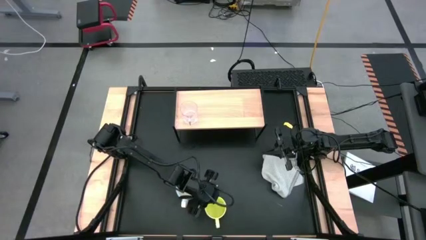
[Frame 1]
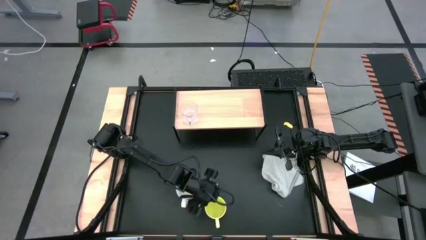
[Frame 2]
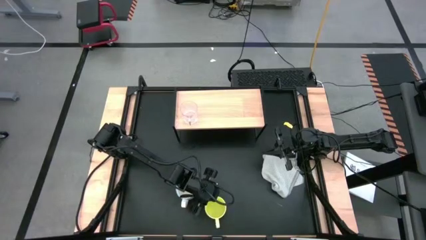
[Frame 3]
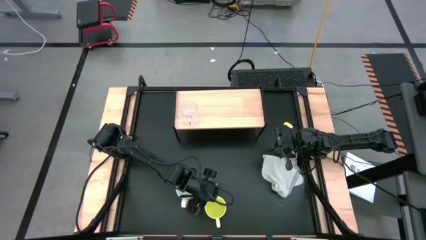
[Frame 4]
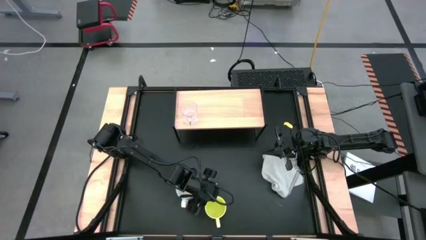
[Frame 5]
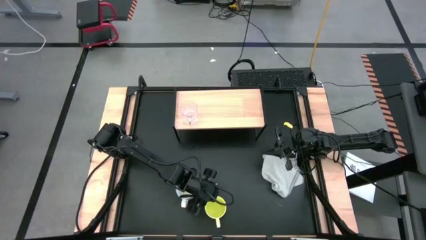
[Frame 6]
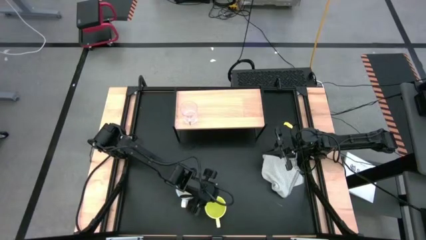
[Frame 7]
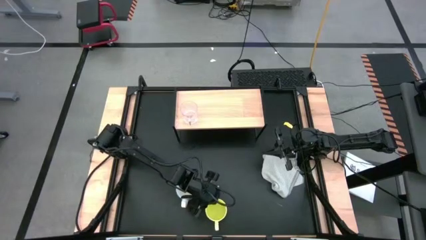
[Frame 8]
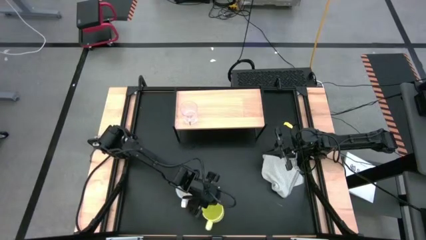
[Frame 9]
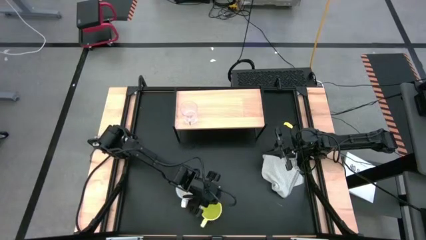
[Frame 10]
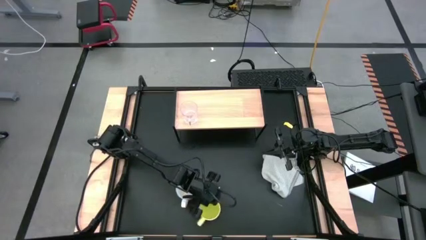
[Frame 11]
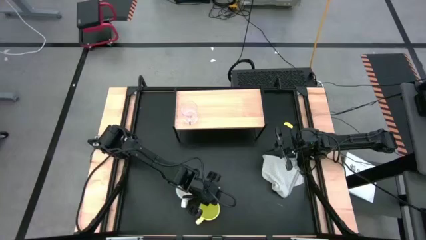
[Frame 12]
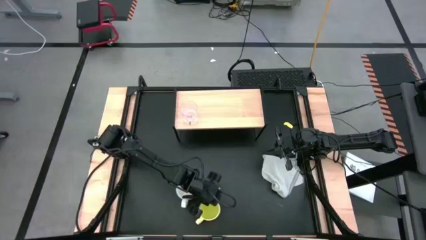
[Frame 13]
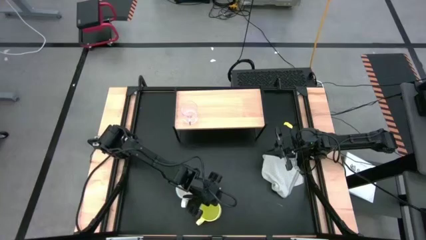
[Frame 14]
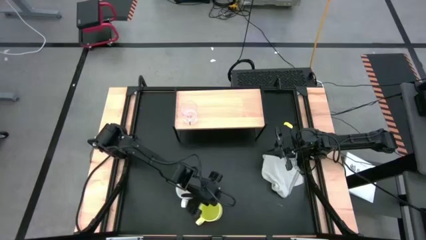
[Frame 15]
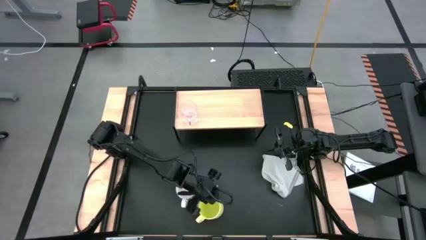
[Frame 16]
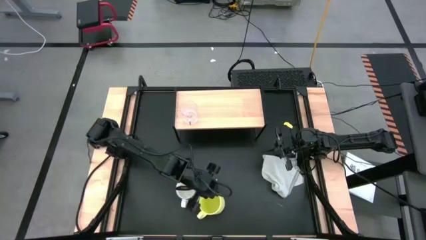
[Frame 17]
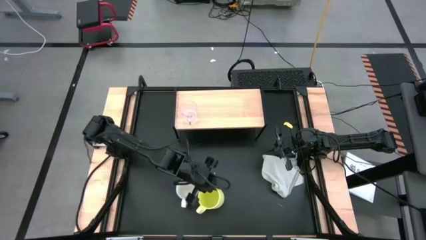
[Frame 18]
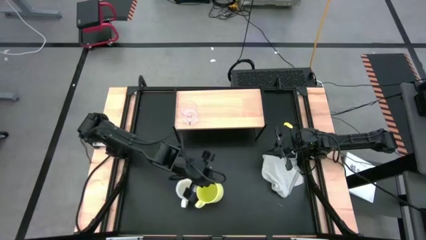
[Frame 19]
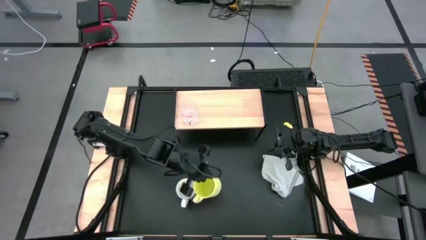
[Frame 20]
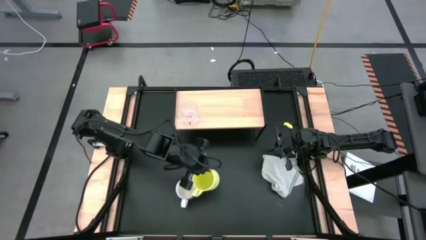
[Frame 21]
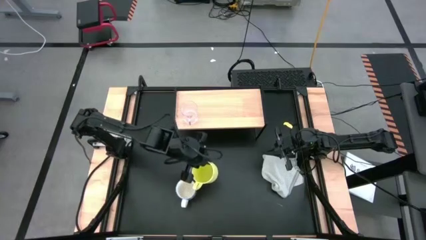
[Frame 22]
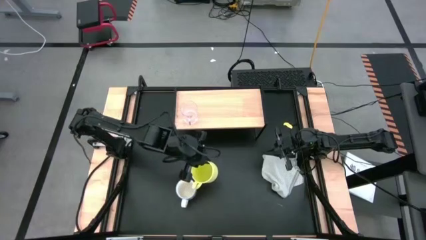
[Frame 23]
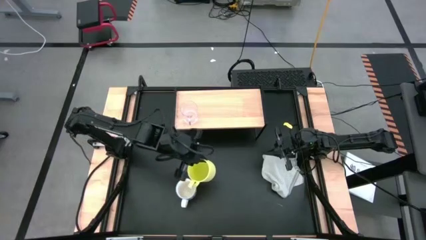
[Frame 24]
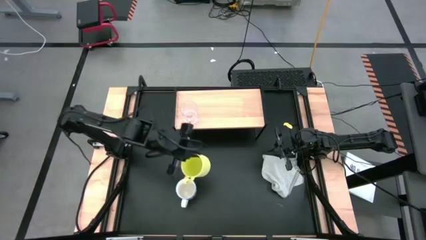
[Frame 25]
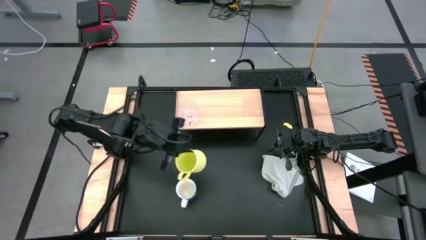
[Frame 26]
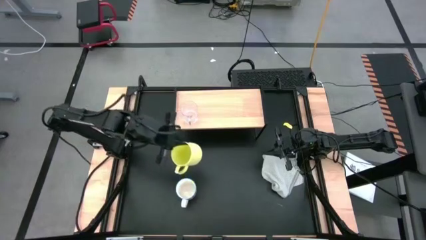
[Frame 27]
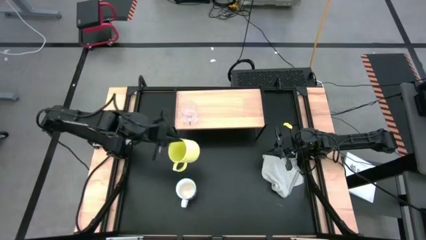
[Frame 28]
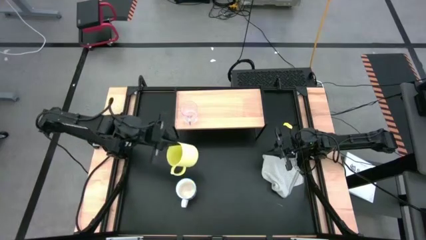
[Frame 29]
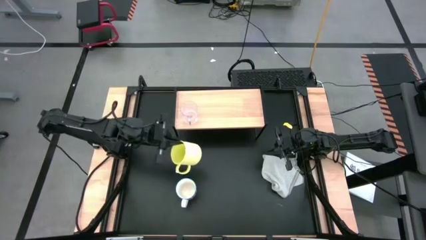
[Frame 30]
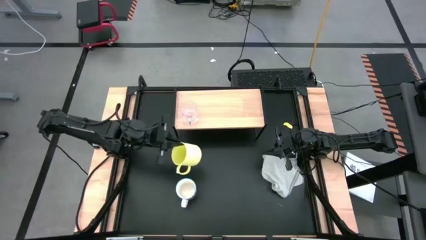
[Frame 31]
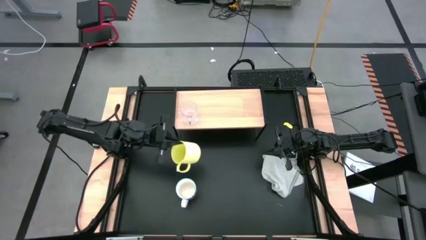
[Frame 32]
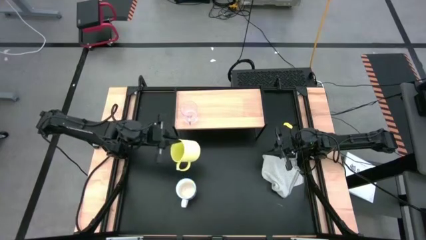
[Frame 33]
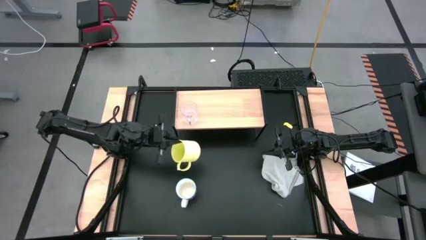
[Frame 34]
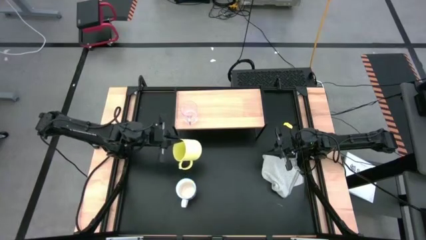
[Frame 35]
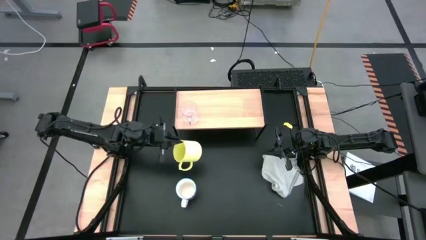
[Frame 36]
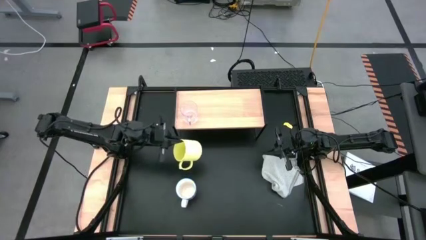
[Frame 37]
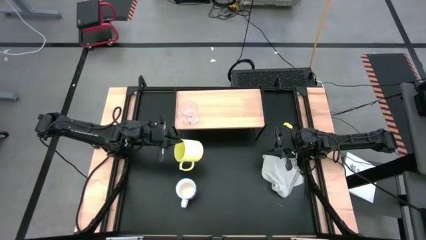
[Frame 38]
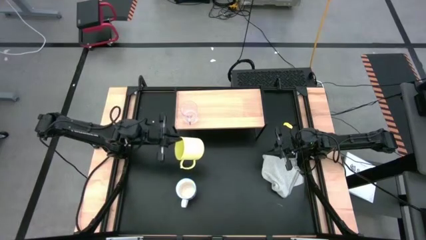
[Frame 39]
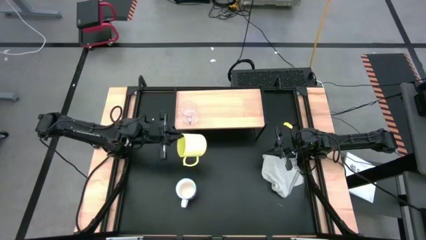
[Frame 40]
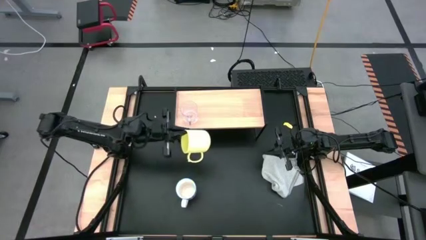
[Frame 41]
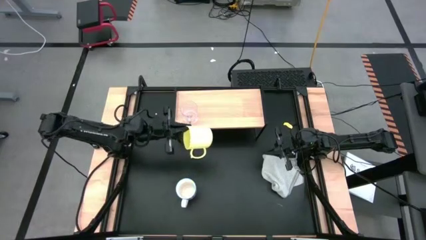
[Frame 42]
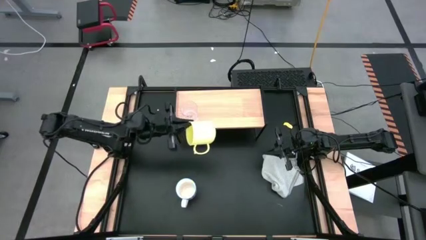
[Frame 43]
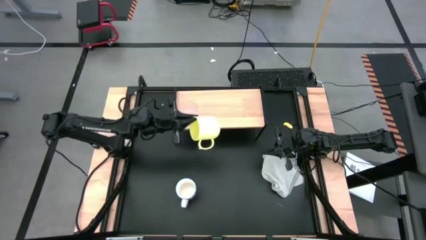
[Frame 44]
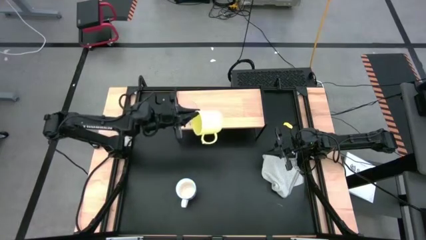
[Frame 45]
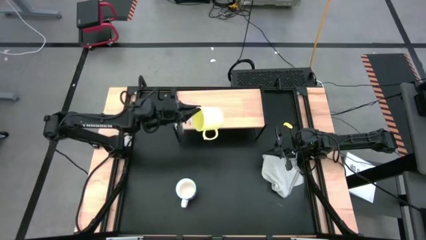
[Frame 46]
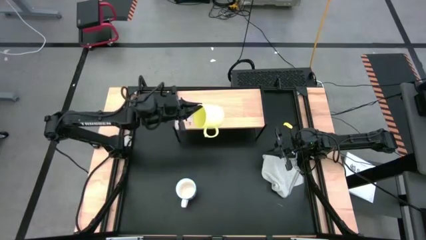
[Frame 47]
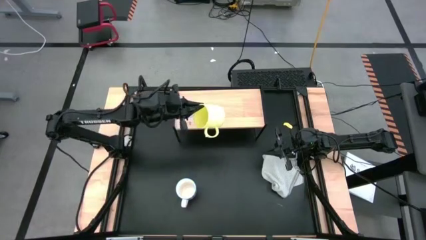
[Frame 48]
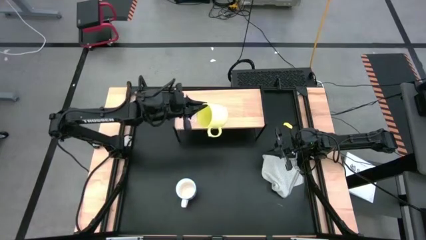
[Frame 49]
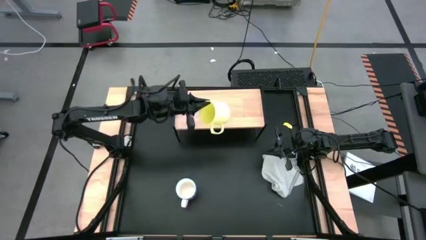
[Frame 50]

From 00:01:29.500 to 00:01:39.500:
Task: Stack small to large cups/mugs on shelf
Put the yellow mug on the shelf

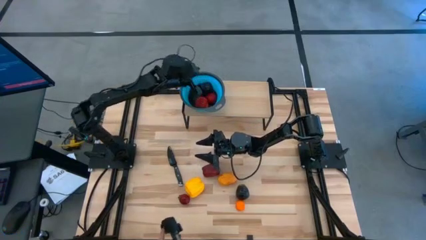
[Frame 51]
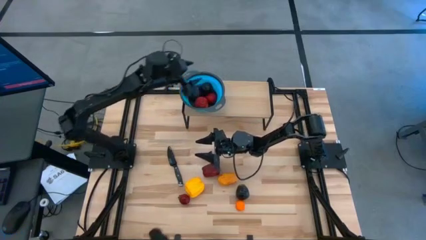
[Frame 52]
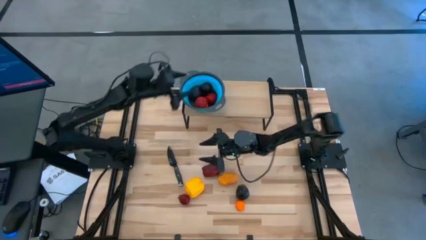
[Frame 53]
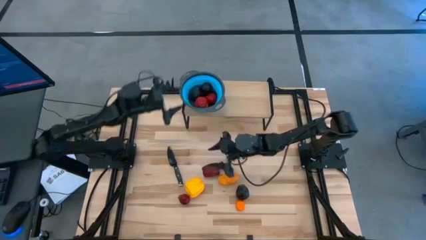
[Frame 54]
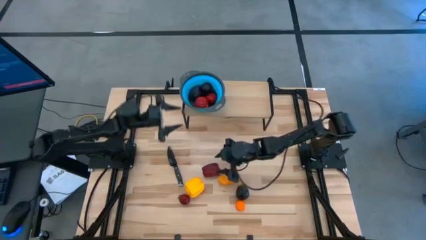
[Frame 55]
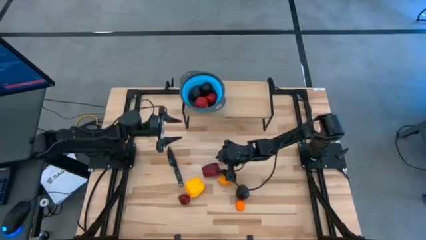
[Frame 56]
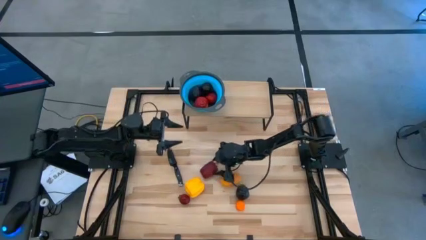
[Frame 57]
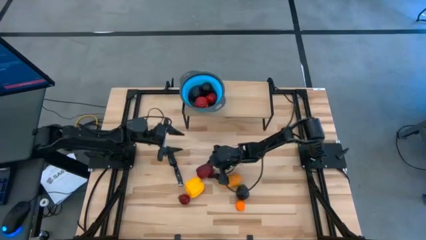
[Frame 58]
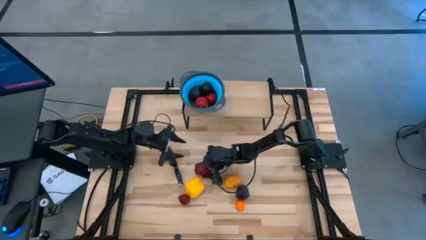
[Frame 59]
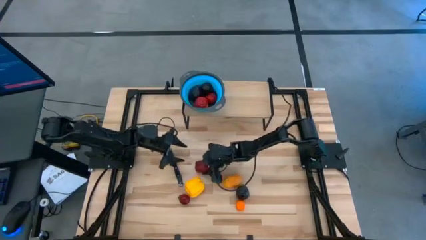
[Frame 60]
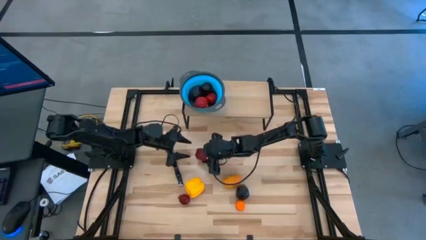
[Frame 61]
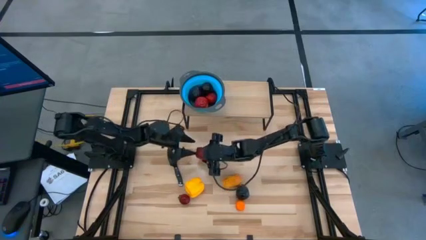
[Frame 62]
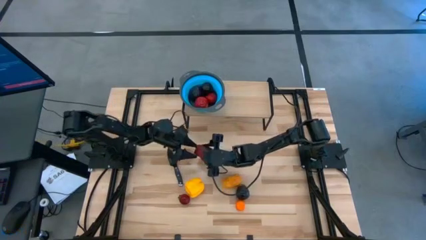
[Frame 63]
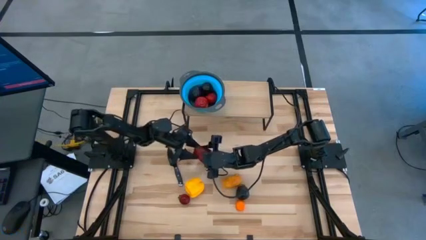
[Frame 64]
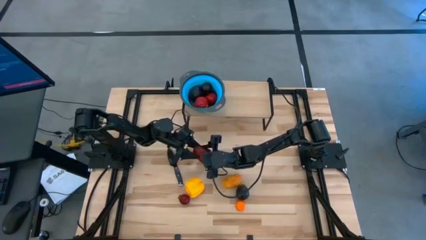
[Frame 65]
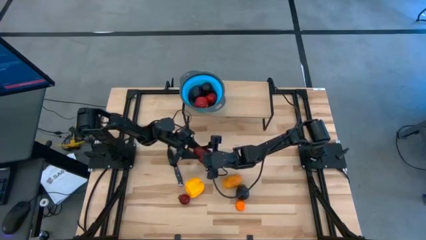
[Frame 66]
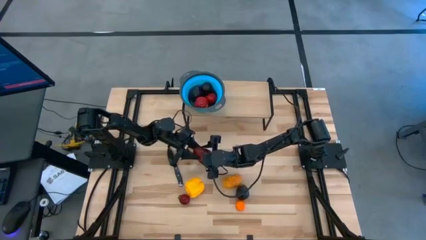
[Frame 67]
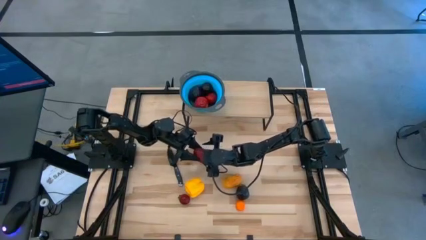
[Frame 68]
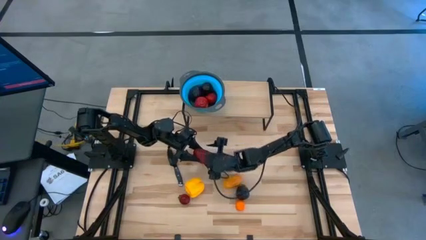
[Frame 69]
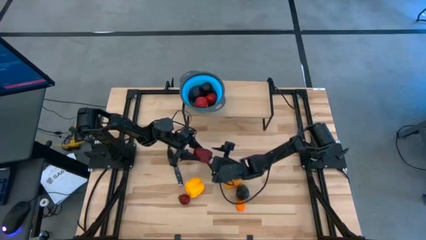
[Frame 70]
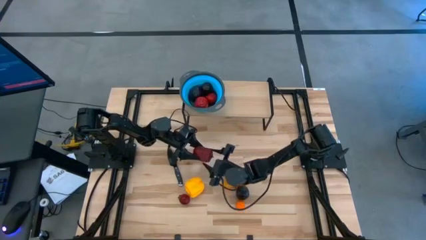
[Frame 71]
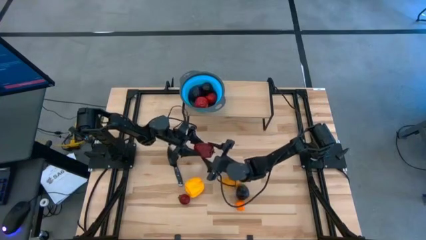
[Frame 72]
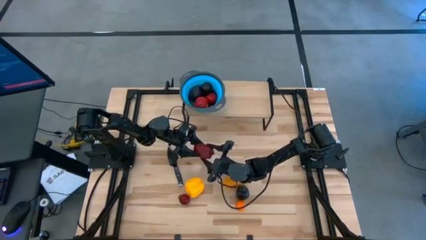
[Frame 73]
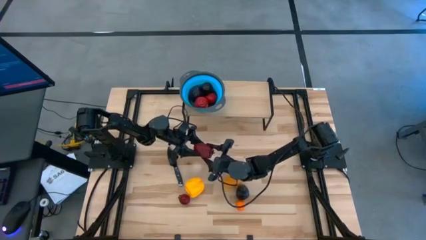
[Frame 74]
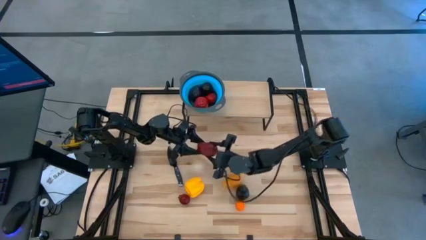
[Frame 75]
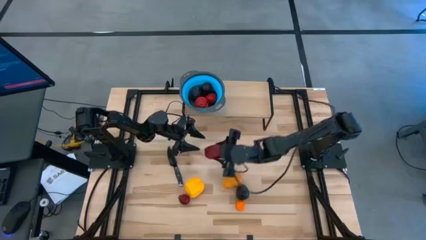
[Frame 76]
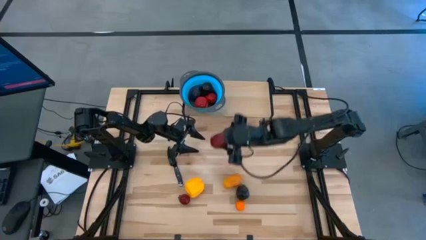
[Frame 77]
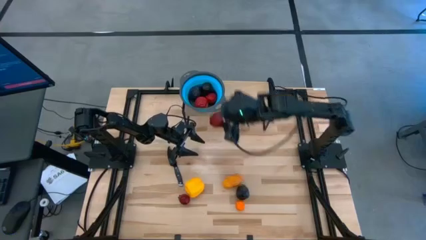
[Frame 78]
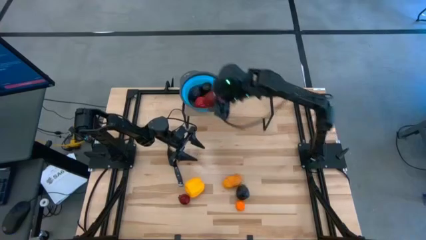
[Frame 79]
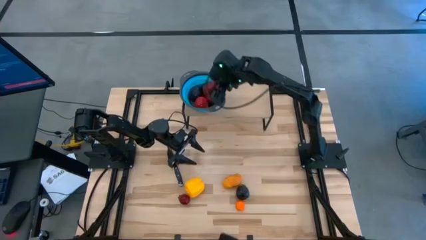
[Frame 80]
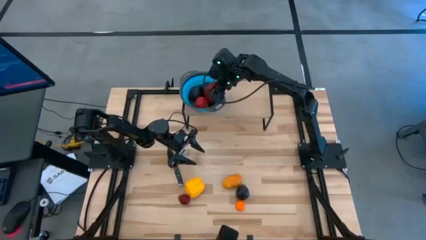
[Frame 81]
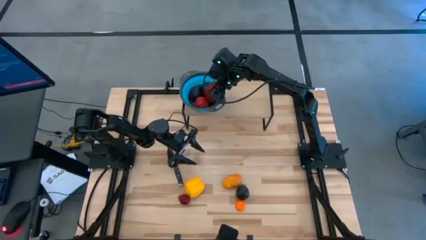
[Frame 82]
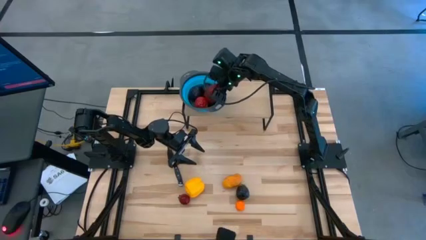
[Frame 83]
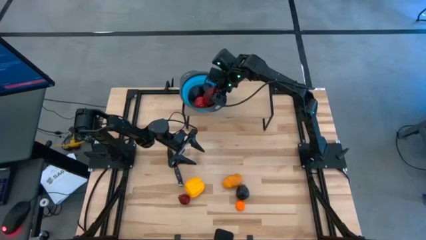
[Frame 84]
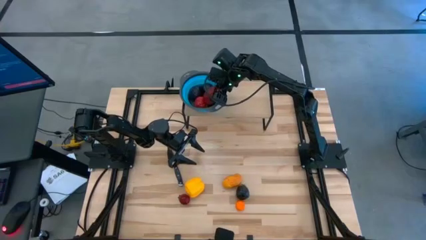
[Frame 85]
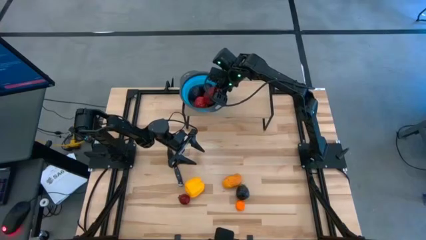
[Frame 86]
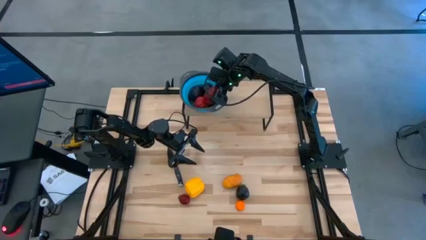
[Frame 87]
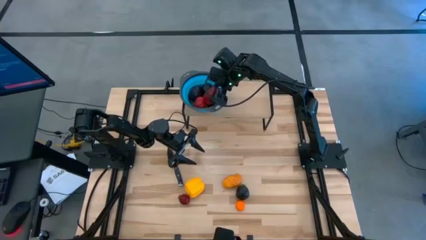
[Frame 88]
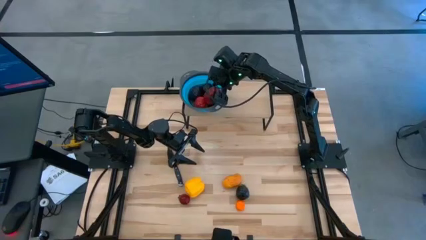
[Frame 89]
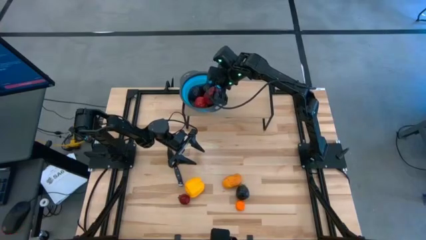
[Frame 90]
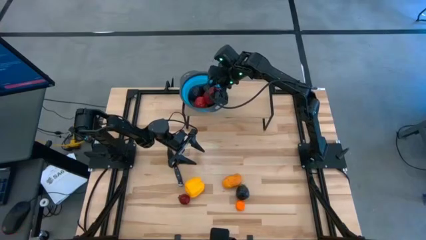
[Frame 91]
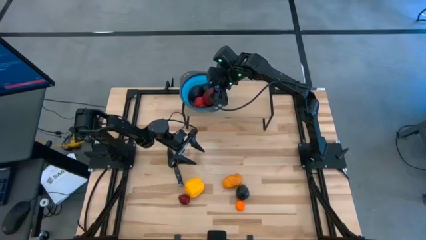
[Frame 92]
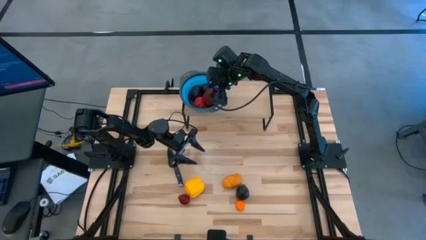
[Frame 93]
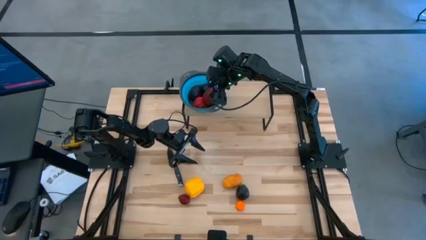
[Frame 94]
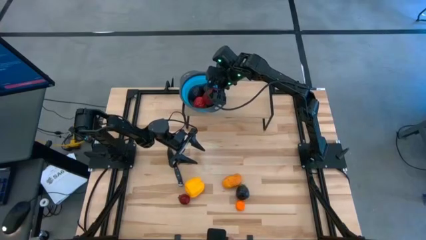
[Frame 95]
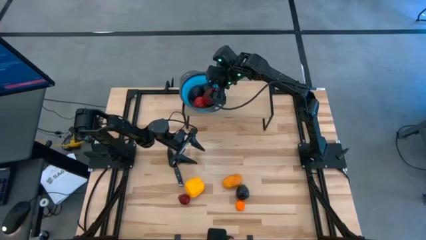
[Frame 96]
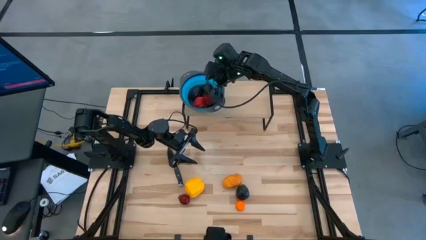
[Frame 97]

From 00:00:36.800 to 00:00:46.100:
Task: Pick & Place Fruit
Put the red apple into the blue strainer bowl on the shelf
